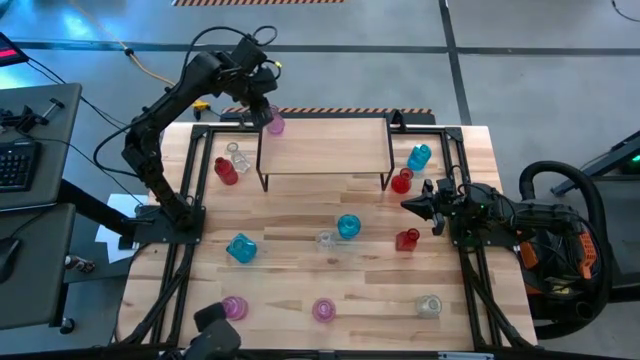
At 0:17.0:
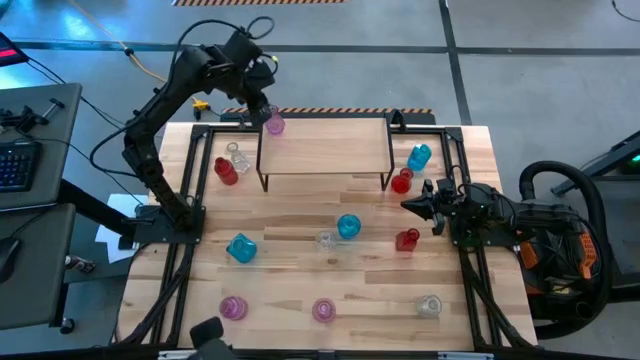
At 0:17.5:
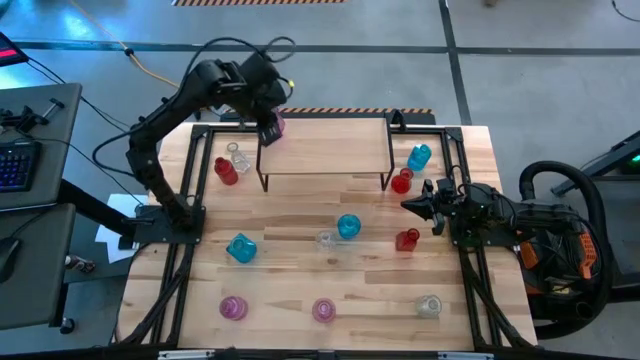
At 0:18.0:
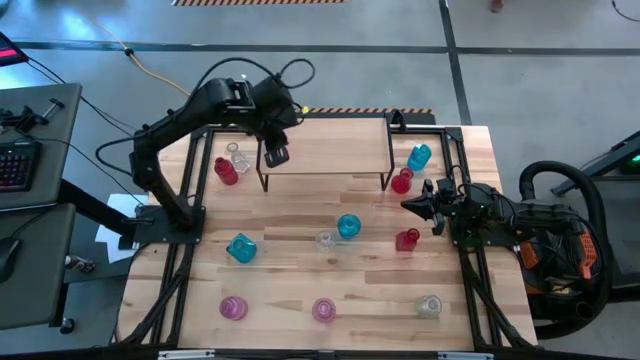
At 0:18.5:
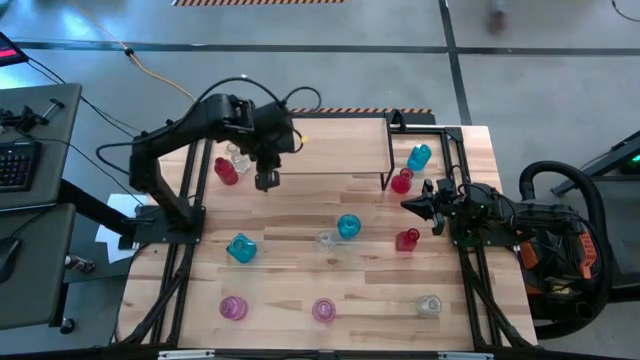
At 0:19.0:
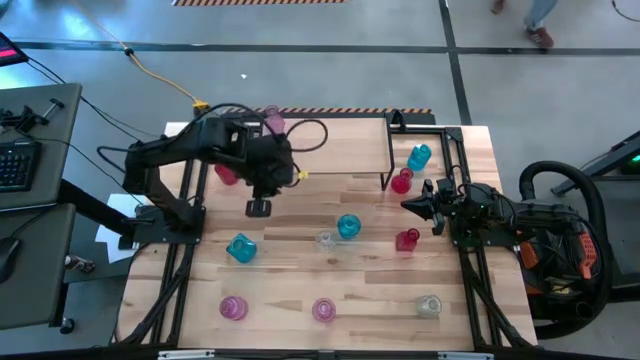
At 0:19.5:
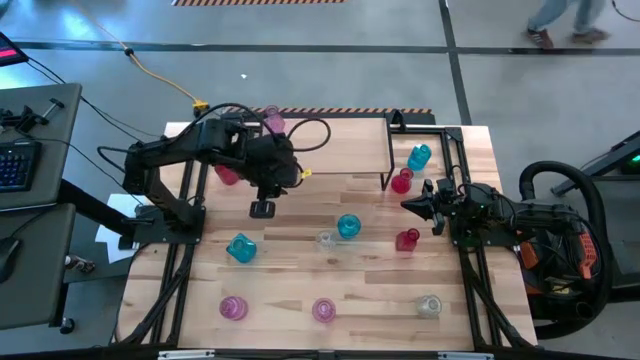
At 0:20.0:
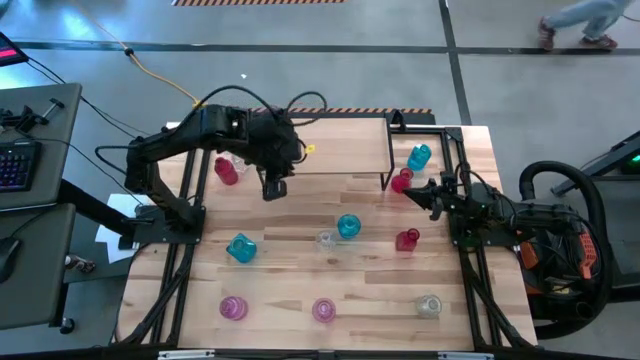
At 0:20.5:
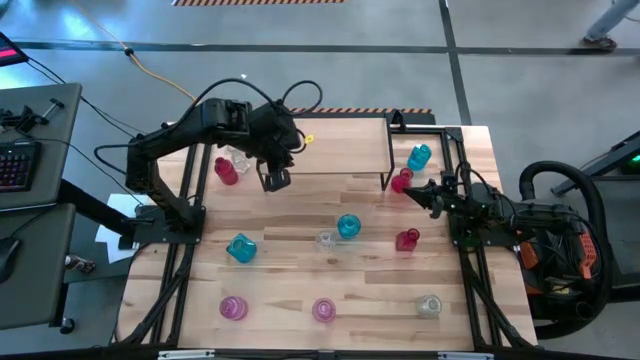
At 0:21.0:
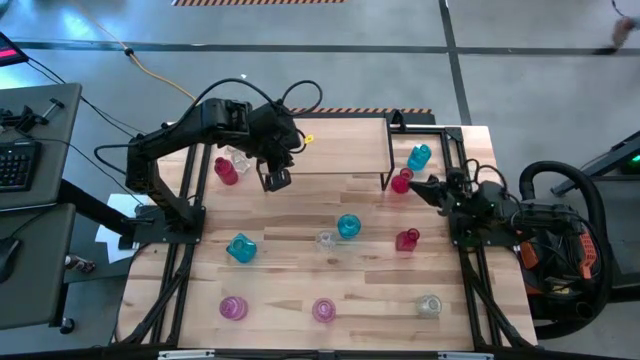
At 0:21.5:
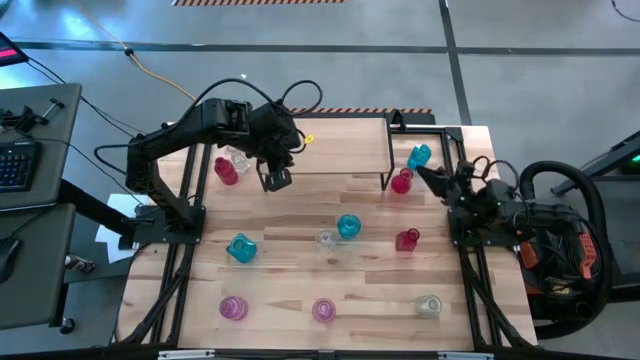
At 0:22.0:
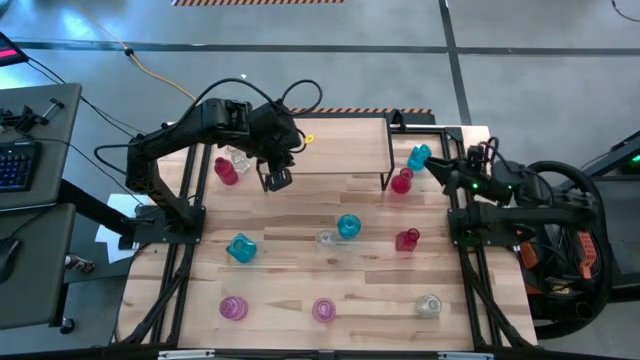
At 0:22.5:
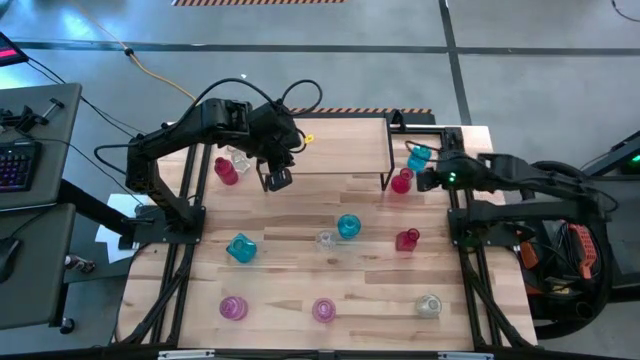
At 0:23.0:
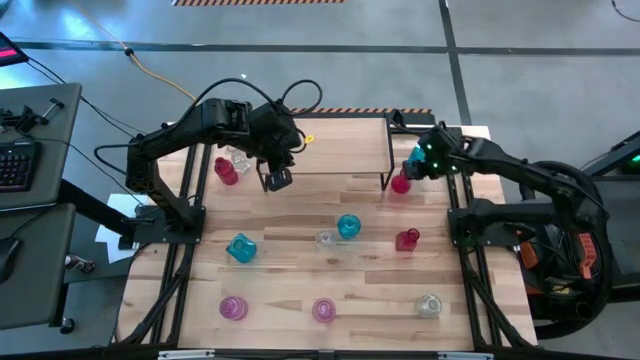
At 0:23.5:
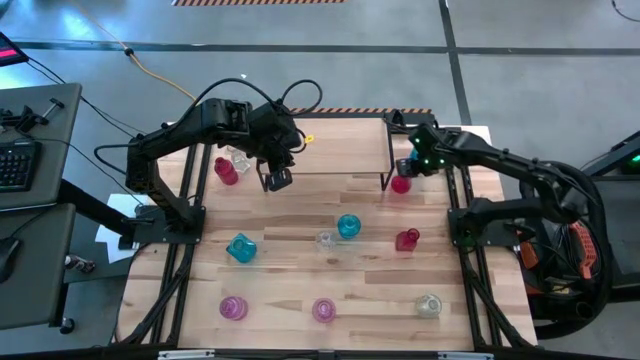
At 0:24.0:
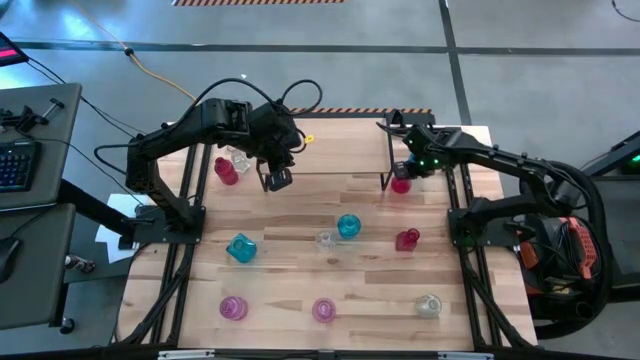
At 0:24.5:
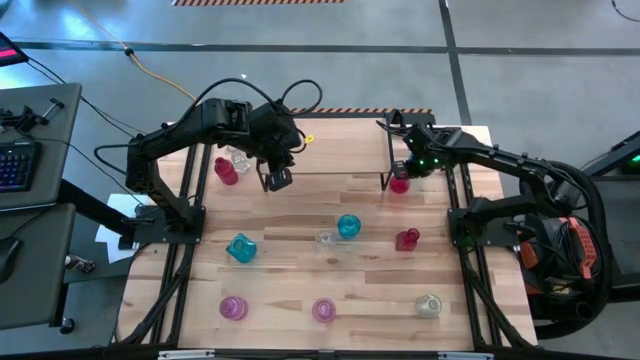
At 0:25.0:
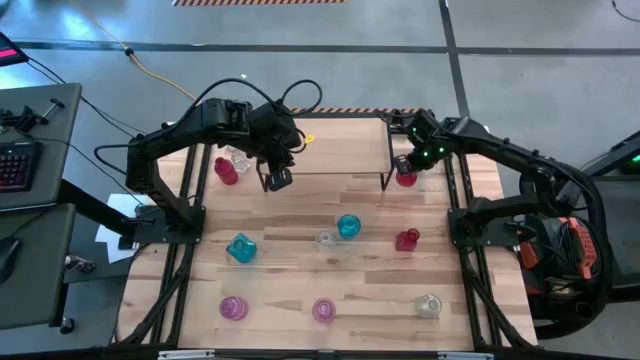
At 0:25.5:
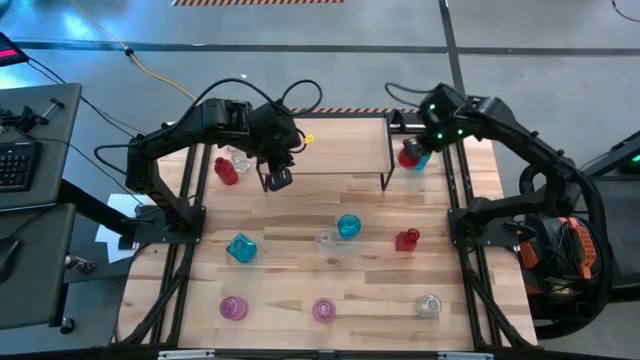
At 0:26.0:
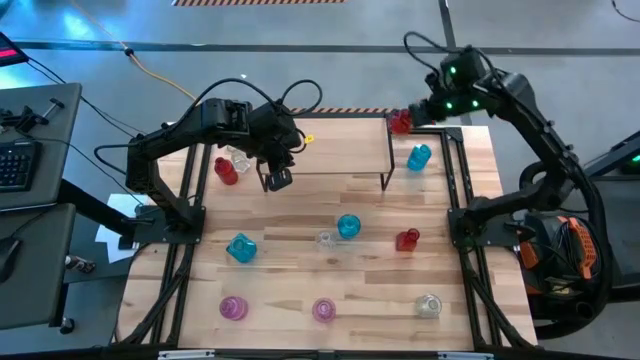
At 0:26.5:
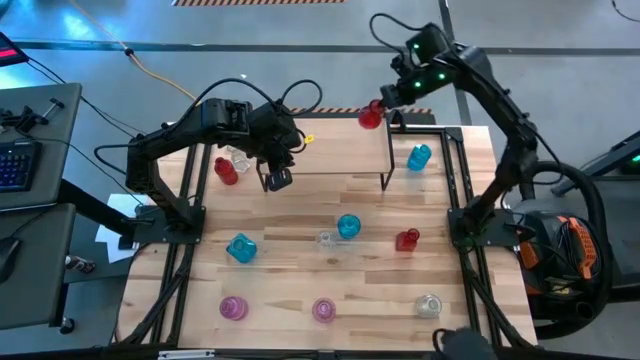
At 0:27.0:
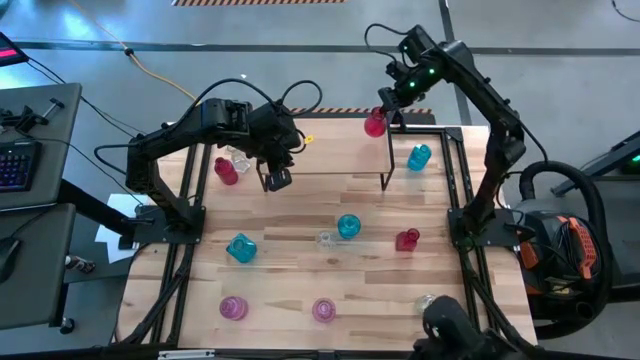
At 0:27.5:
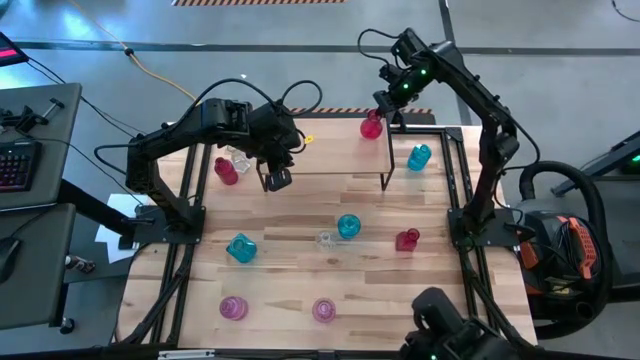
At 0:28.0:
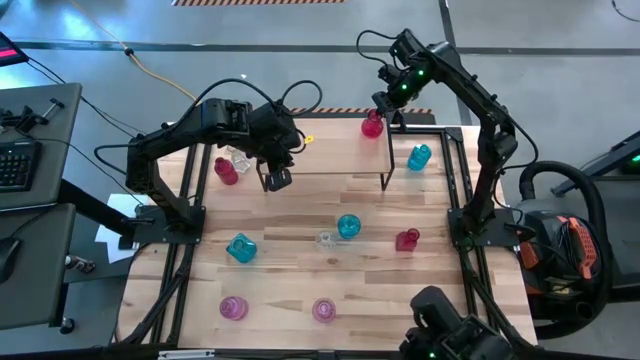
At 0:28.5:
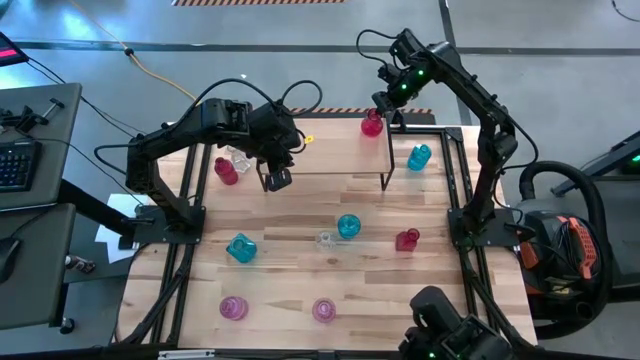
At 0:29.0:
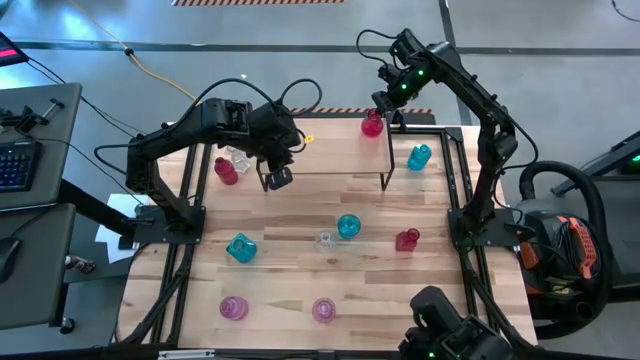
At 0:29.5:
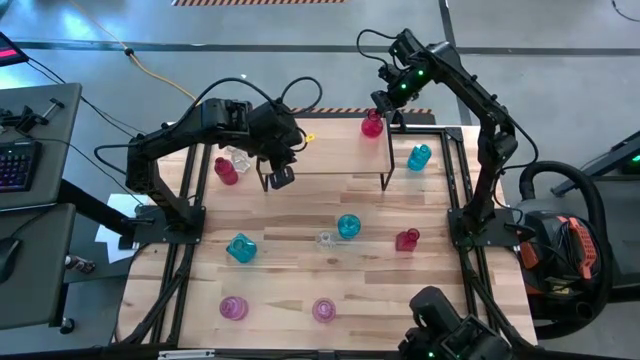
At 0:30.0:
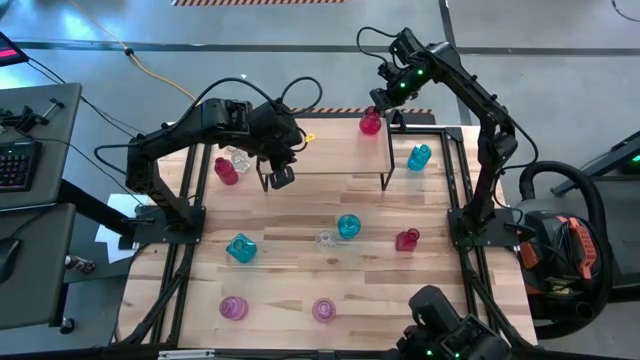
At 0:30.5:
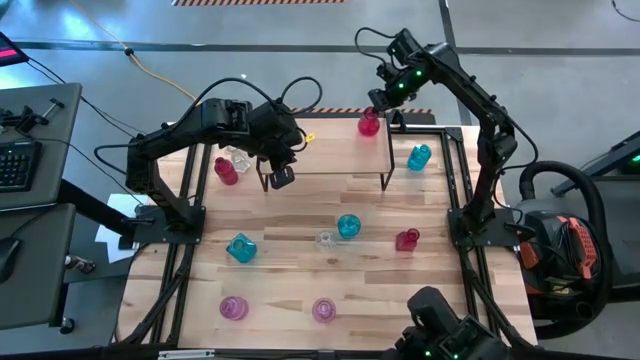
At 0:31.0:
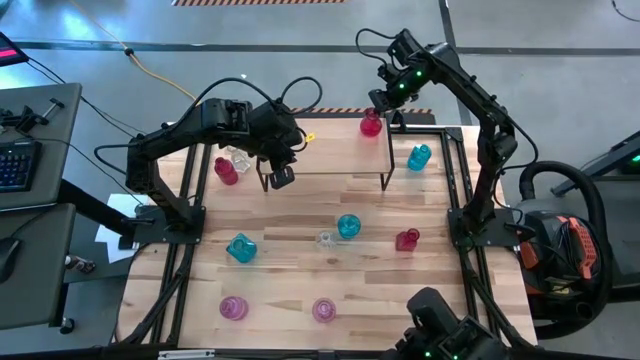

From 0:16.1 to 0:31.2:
Task: sort vases onto shelf
Put the top right red vase on the shelf

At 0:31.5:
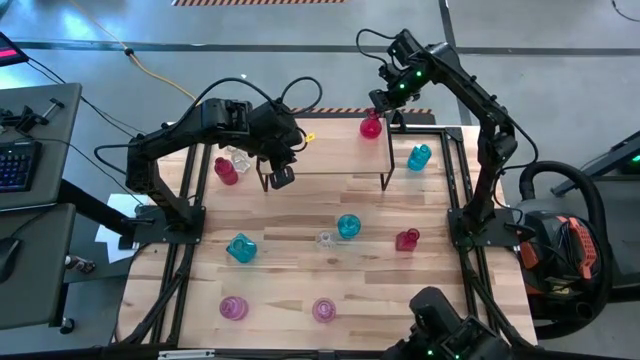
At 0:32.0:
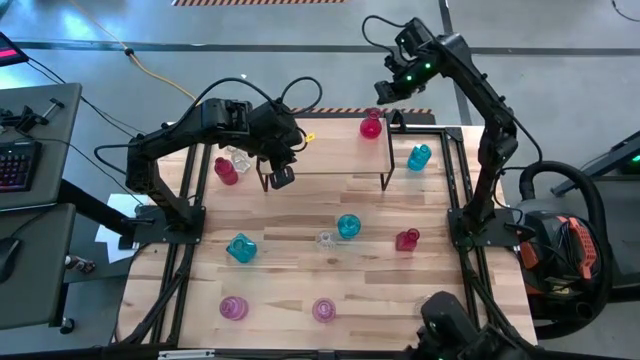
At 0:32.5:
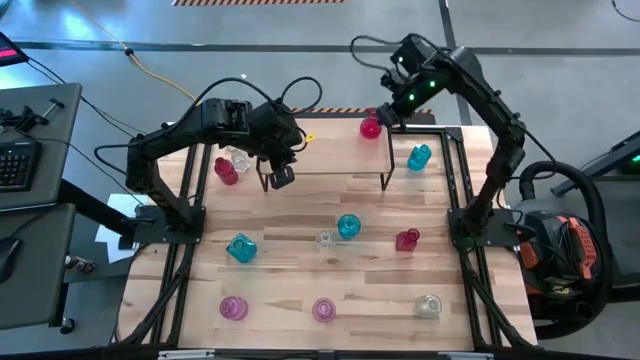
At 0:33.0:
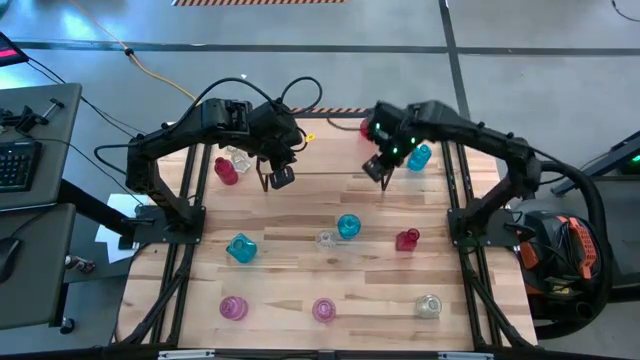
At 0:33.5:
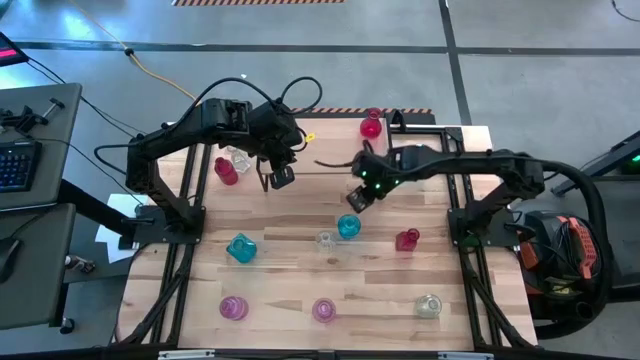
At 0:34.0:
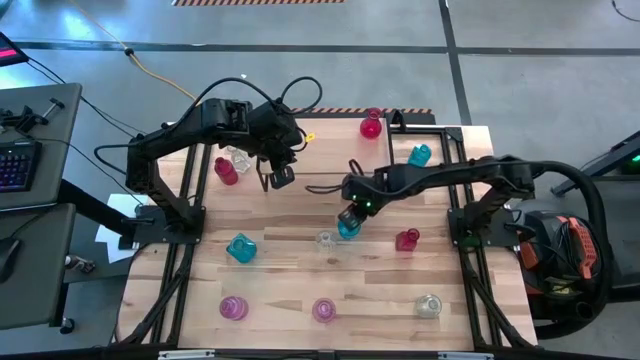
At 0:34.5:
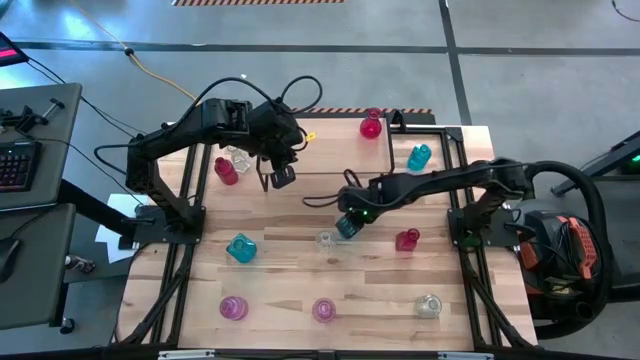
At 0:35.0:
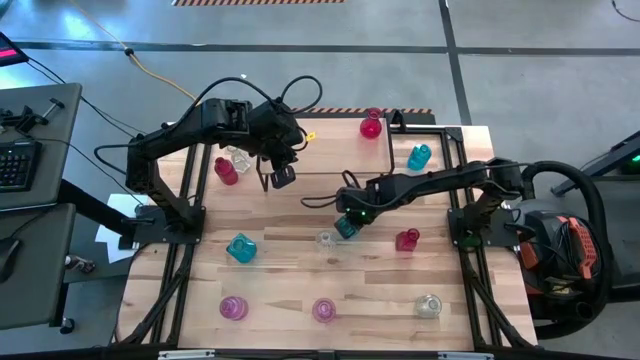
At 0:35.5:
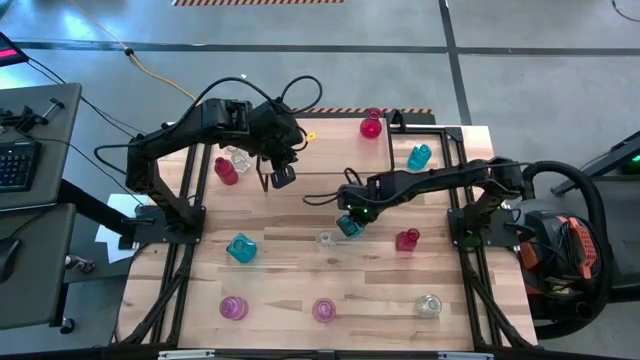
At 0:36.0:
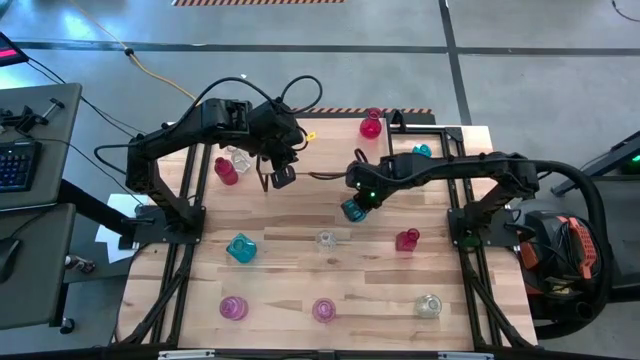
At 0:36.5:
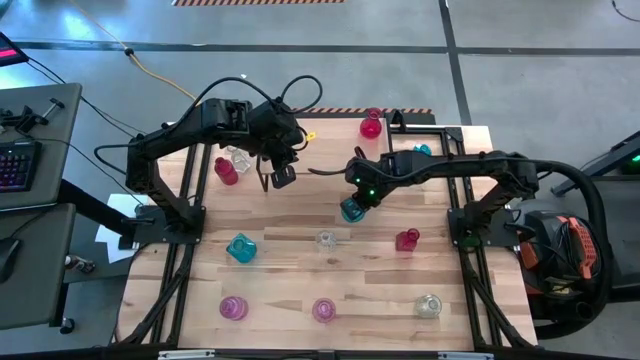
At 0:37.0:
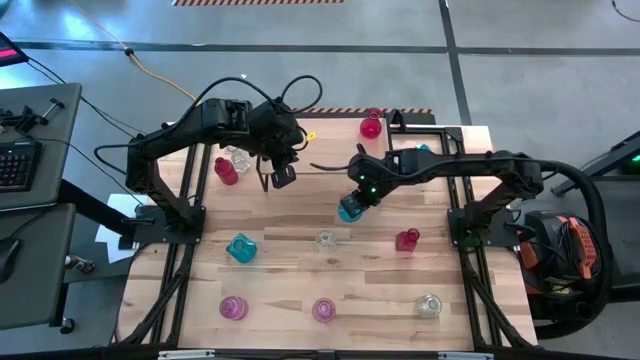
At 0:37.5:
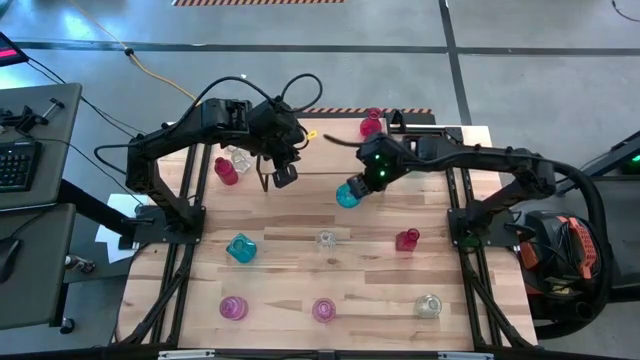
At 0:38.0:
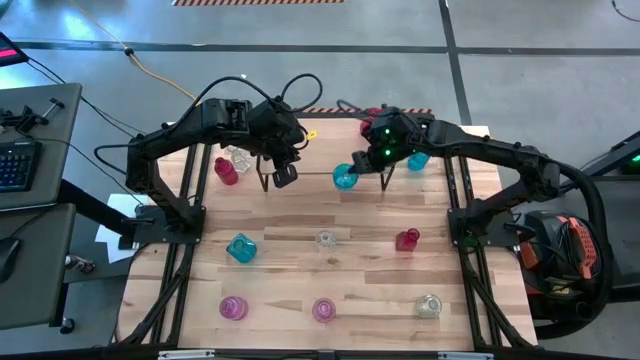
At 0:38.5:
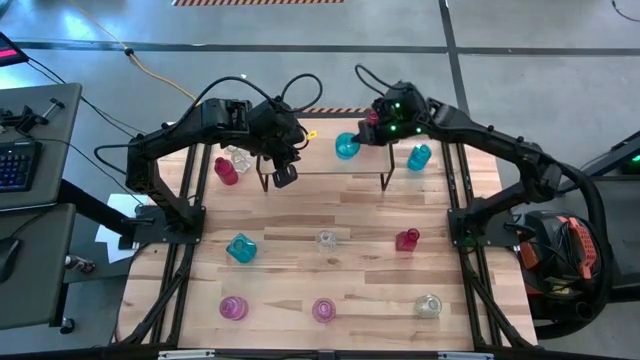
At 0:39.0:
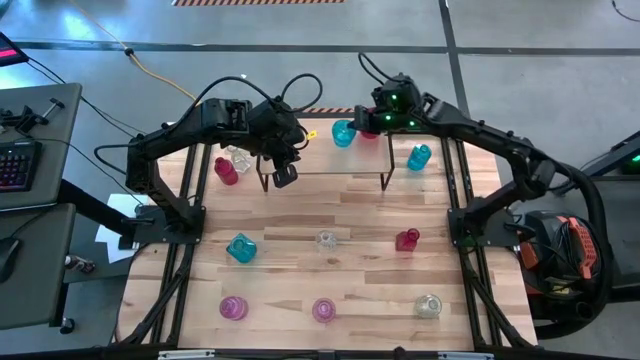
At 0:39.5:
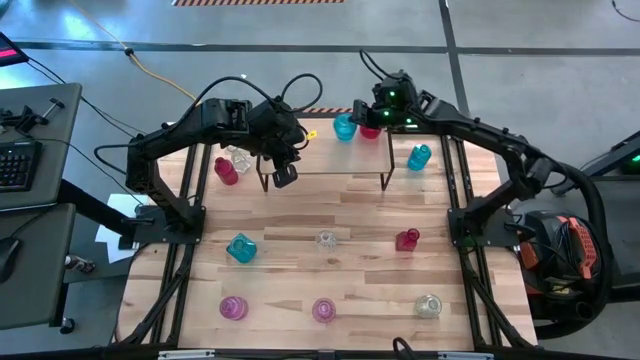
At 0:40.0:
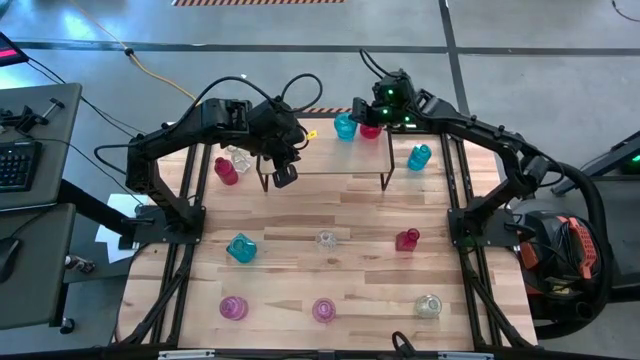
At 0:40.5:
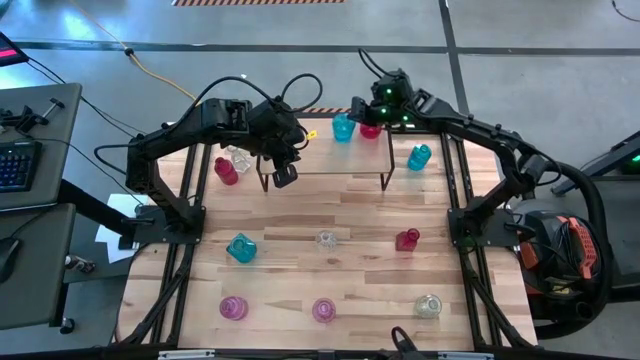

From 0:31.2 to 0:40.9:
Put the bottom right blue vase on the shelf
